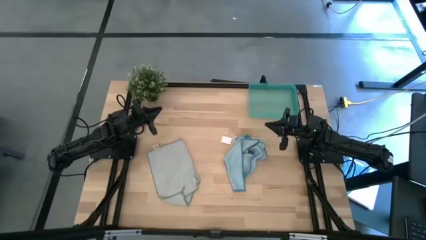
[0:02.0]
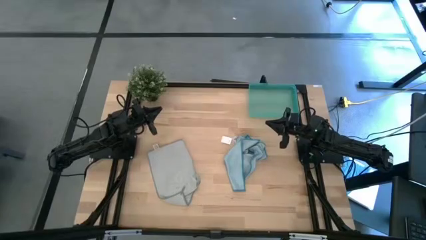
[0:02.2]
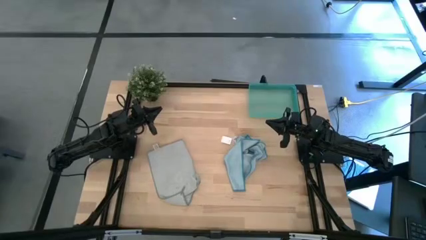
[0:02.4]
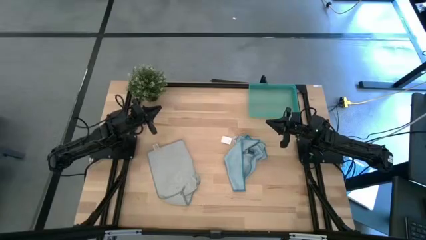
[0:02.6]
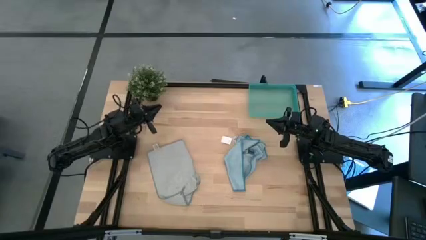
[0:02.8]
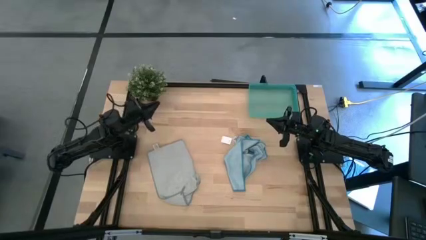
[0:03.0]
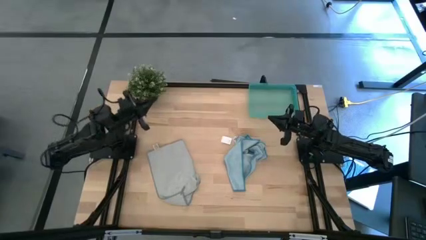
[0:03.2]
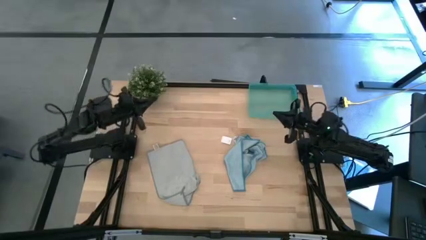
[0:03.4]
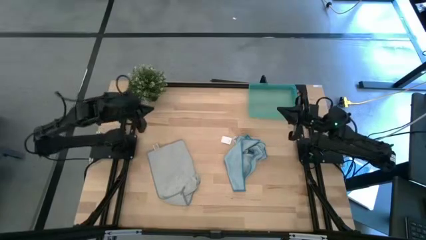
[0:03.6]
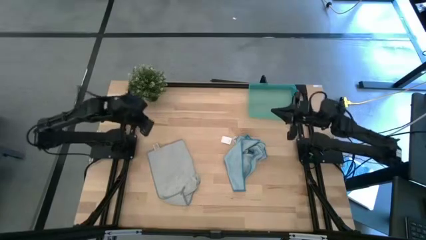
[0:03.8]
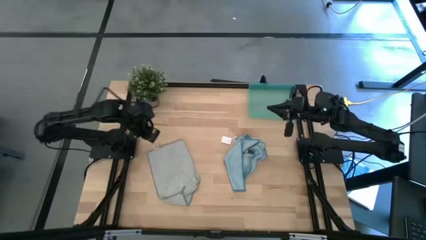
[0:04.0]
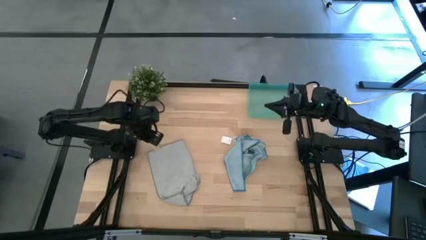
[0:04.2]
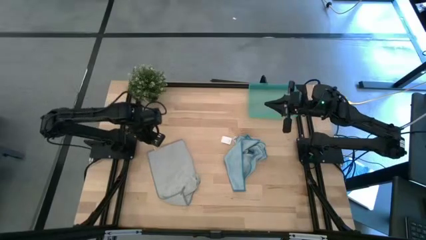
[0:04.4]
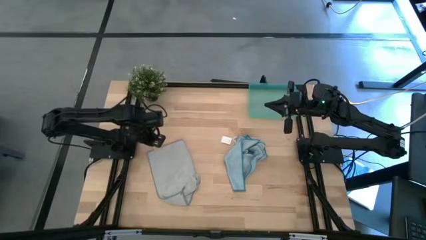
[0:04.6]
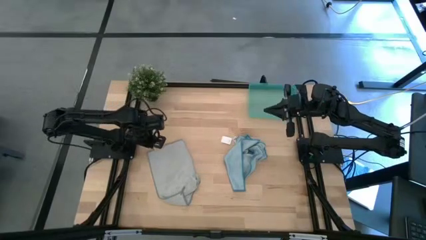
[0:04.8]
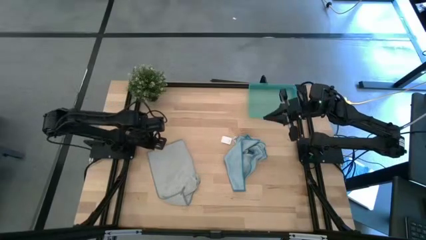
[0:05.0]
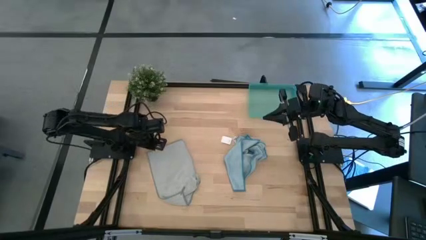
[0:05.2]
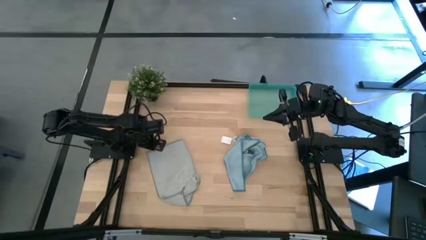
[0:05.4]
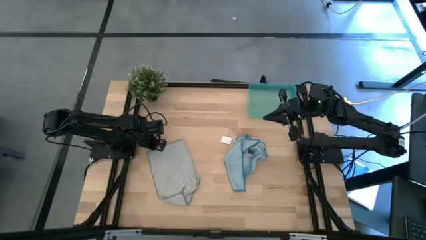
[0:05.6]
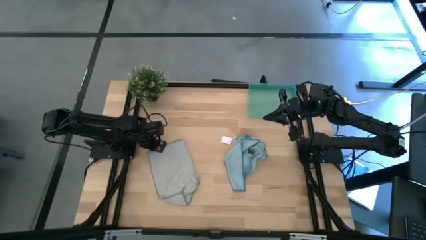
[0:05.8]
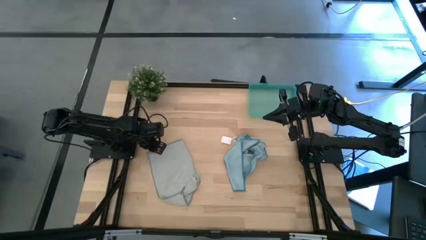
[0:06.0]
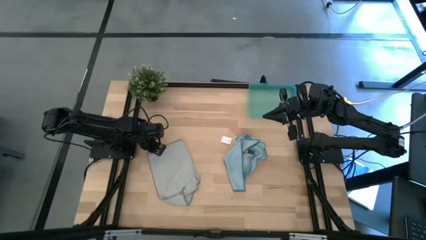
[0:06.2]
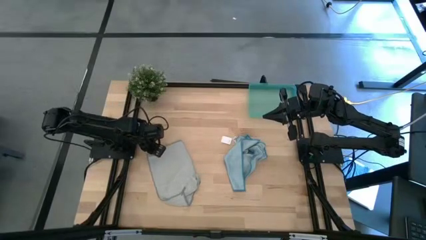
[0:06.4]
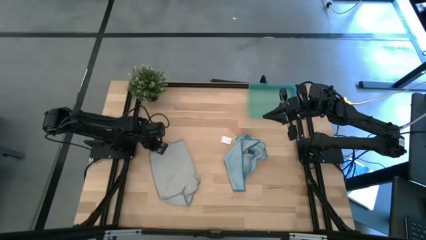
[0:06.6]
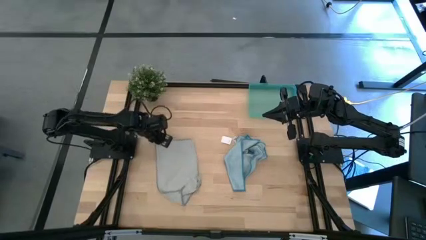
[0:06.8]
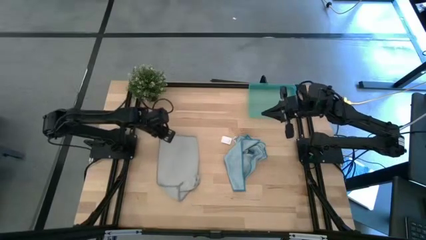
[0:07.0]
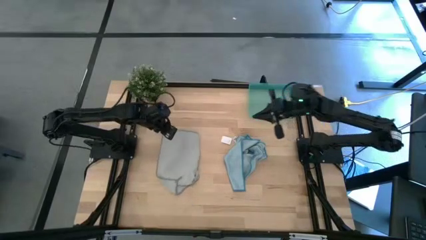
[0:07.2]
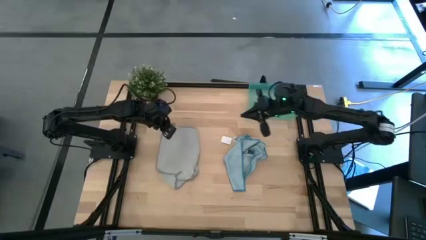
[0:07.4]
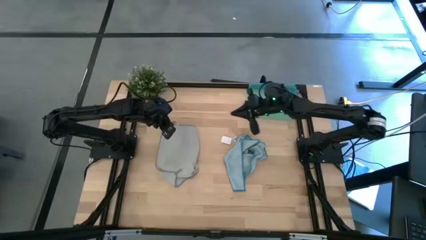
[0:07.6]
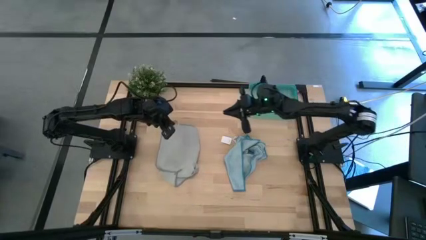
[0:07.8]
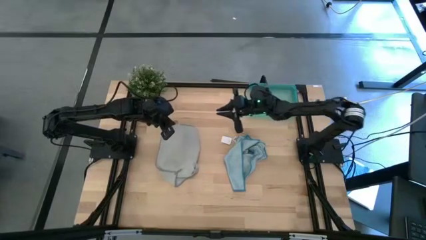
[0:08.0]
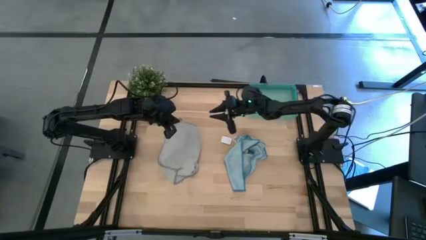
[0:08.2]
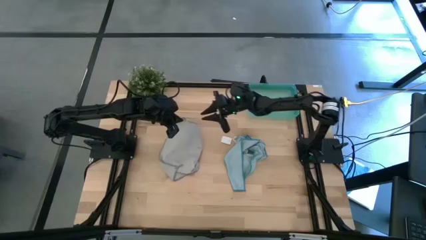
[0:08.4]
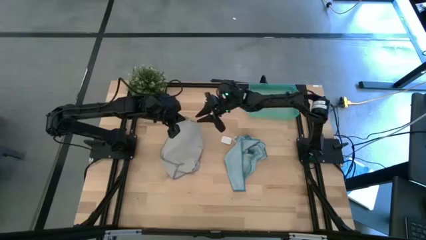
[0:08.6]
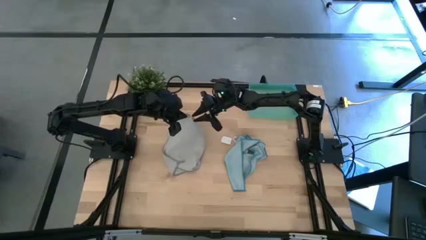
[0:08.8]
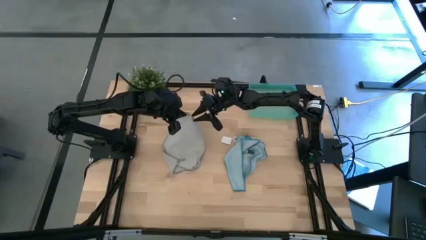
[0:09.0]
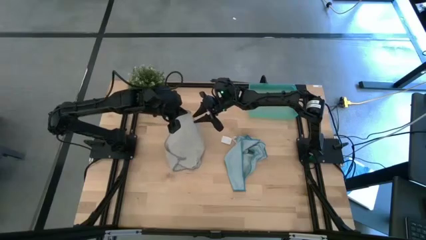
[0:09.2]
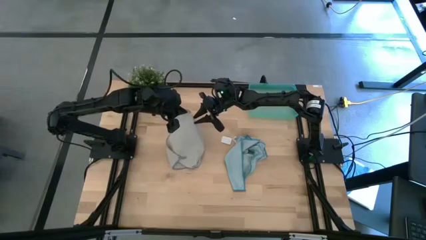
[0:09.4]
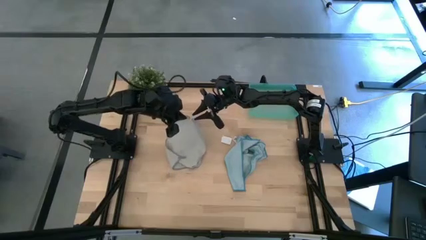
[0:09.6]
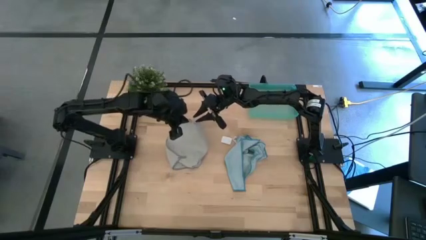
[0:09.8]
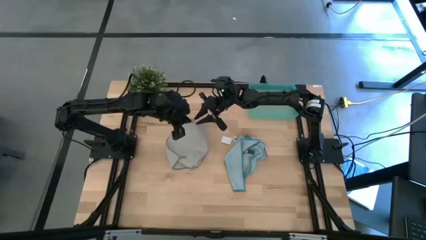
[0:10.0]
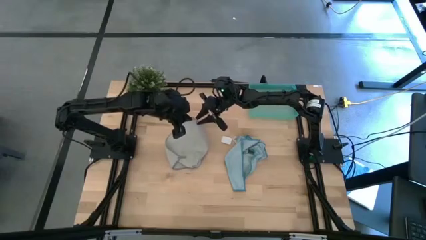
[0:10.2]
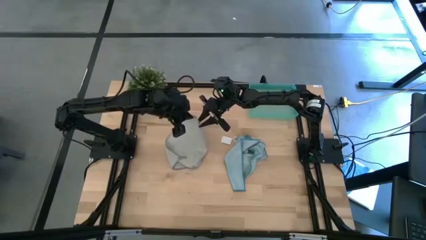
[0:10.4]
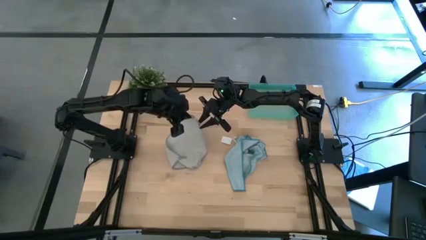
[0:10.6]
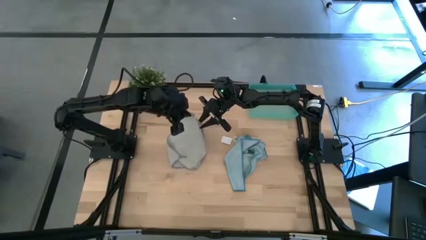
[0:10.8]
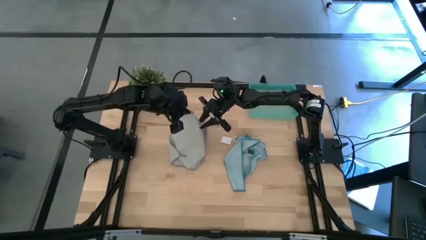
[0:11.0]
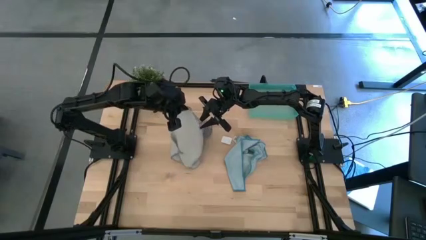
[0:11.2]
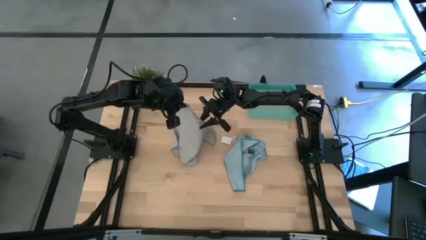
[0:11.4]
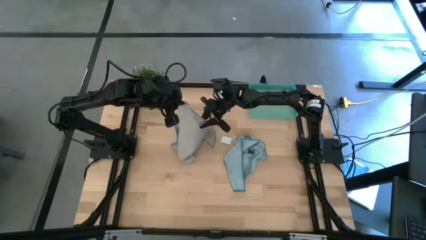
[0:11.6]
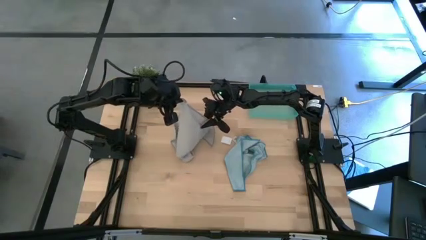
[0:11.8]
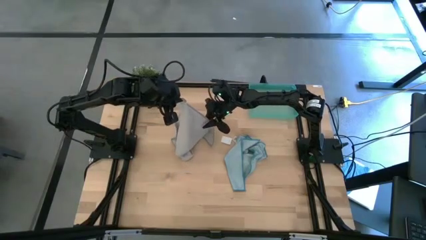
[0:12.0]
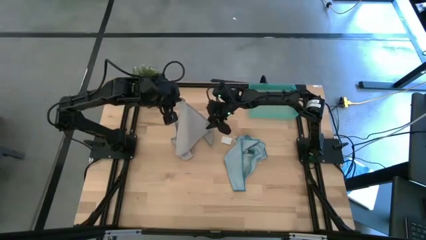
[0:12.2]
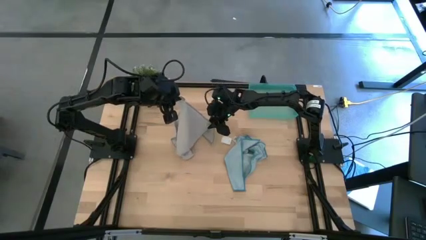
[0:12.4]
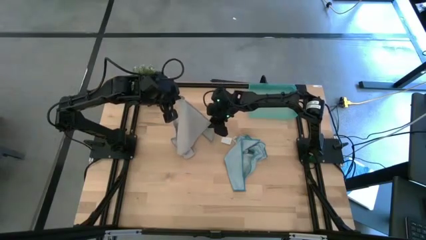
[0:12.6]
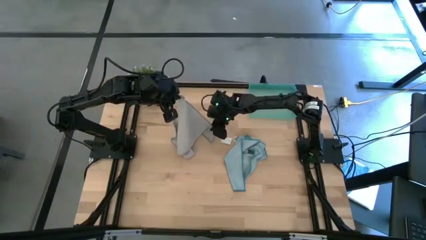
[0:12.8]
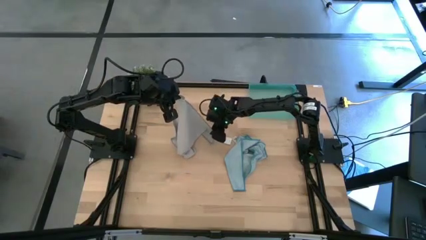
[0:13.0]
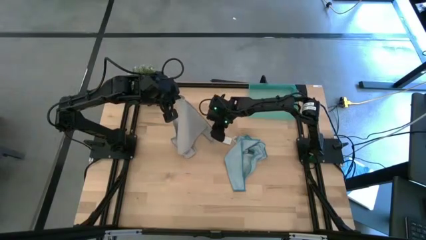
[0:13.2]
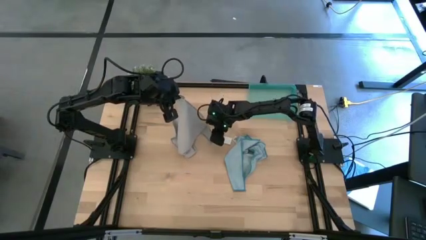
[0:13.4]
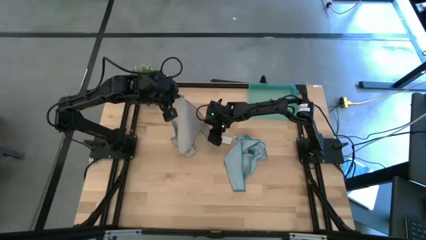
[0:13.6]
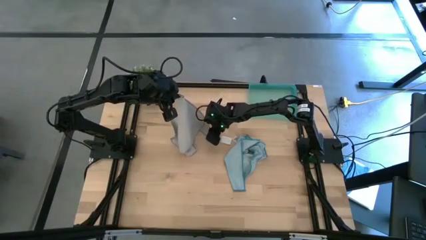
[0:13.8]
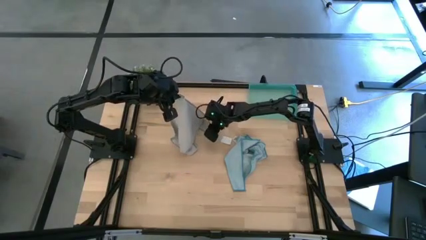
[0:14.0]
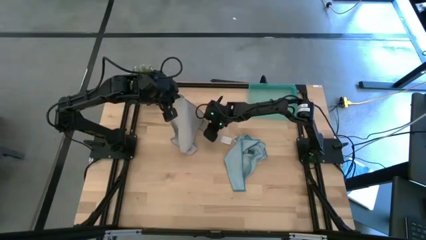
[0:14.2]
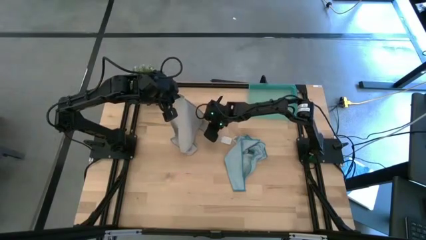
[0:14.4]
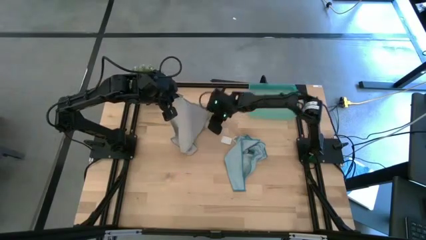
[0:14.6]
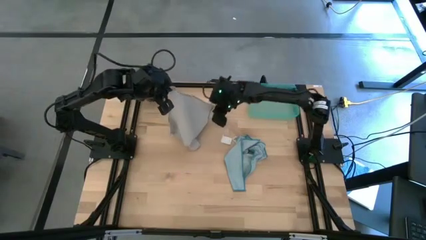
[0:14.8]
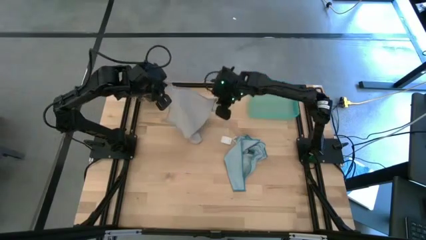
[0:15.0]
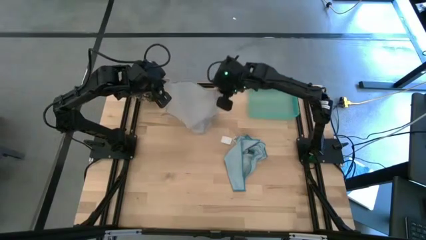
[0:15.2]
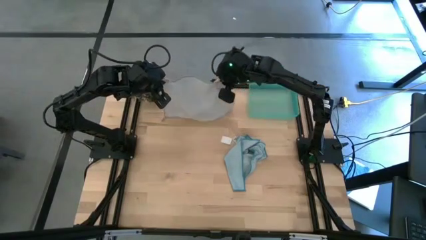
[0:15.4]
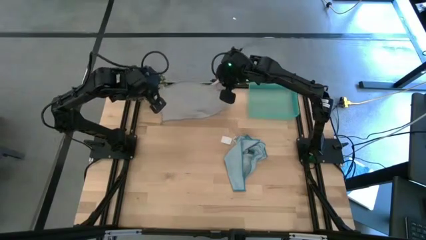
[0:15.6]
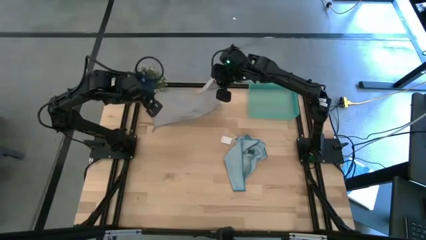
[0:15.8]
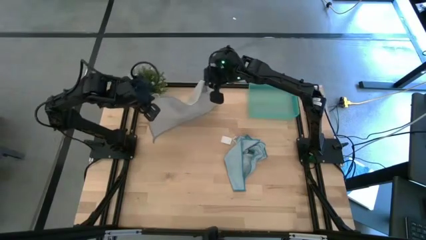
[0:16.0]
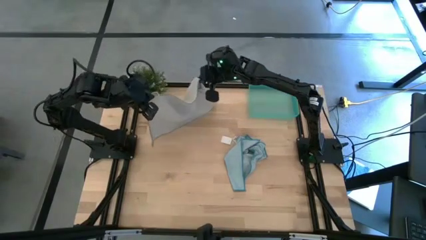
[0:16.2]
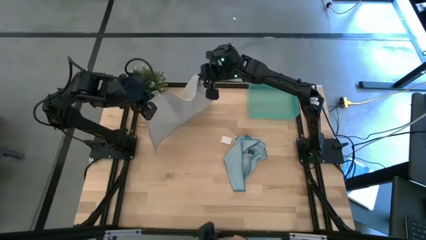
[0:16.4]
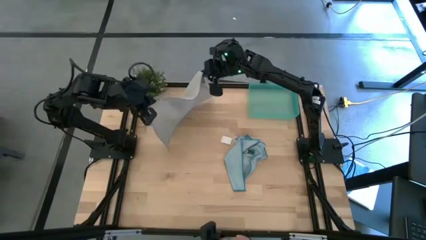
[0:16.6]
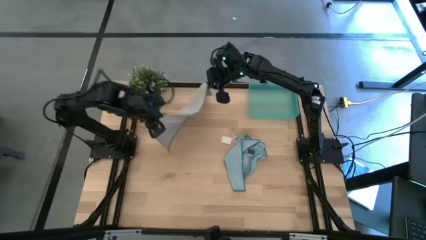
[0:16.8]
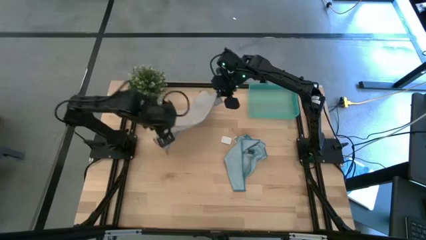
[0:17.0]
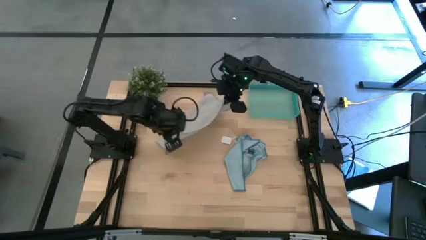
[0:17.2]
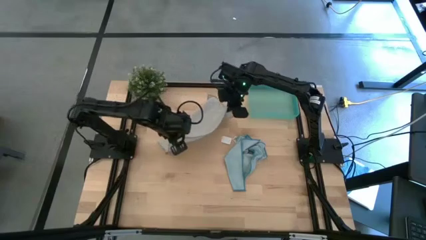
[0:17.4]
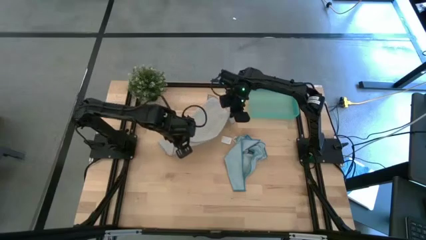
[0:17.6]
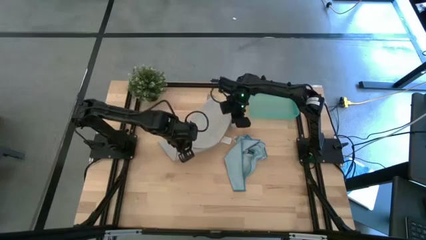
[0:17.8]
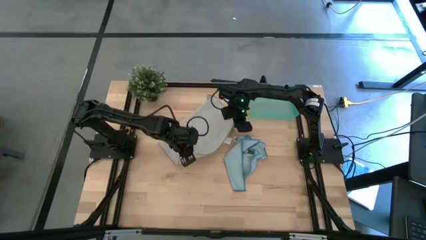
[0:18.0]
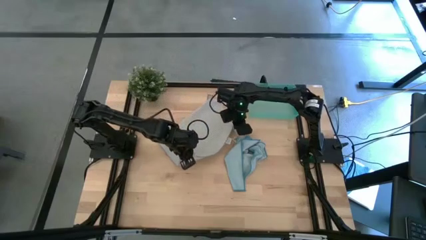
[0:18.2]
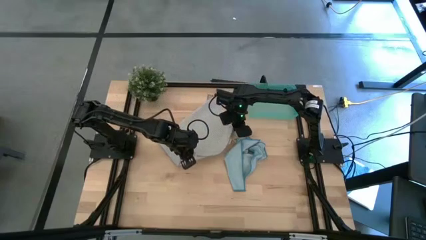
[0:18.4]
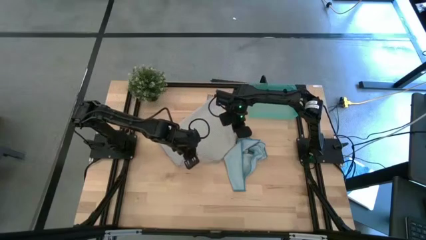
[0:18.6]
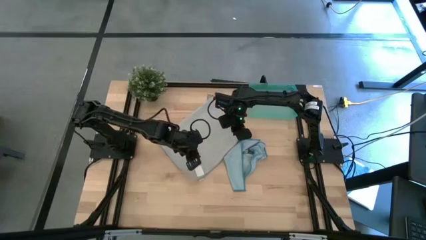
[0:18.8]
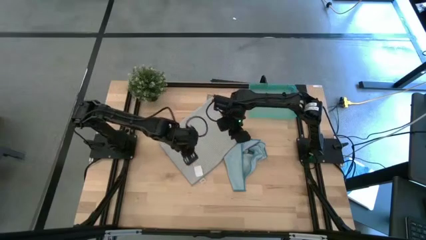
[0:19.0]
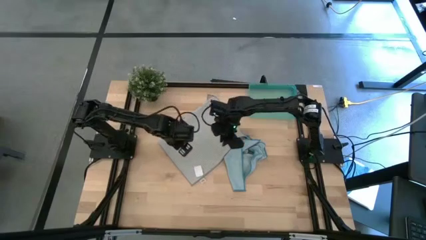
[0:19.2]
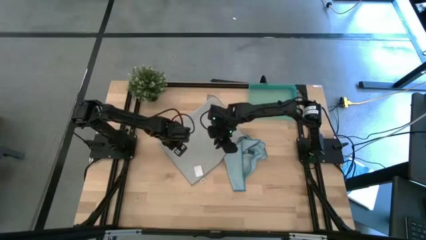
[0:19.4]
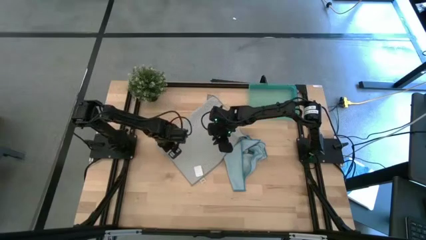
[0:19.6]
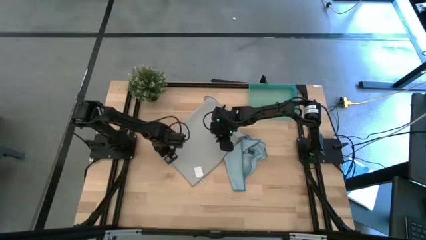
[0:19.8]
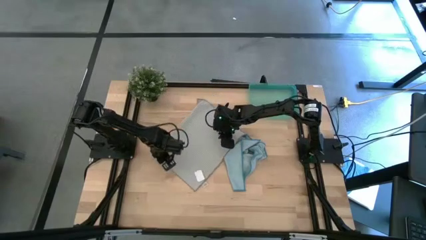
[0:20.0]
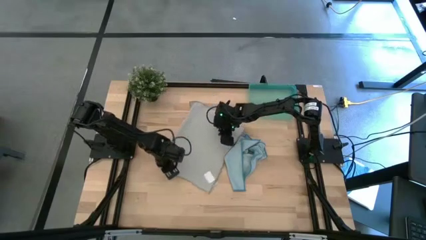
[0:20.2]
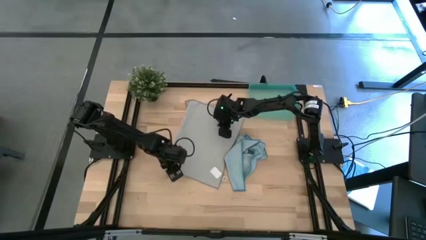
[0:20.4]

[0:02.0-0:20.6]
Task: Roll microfiber towels into tight, uniform cylinder then place into a basket
Roll the grey microfiber towel
